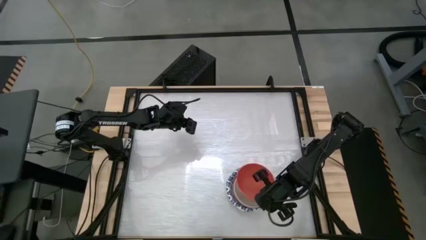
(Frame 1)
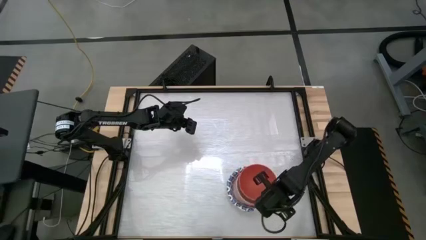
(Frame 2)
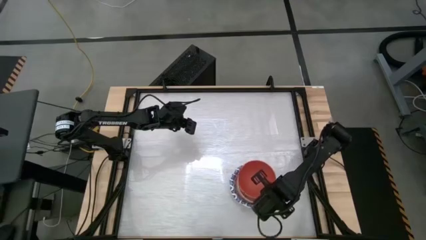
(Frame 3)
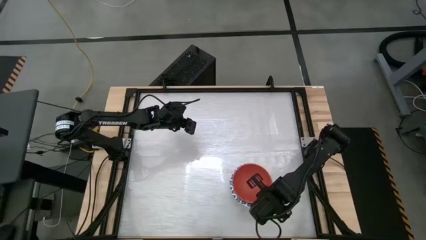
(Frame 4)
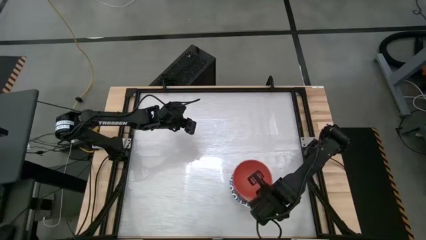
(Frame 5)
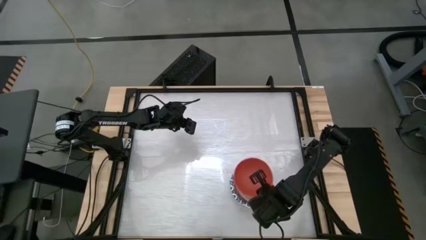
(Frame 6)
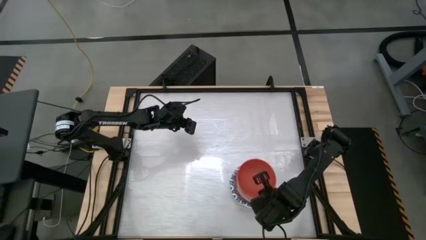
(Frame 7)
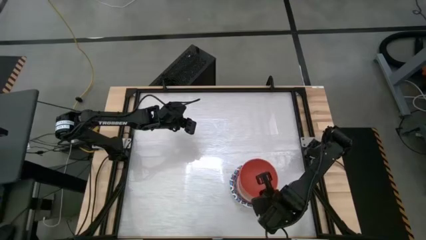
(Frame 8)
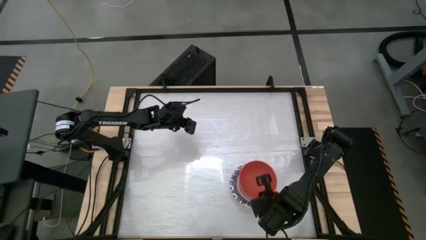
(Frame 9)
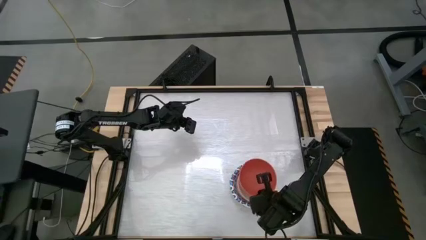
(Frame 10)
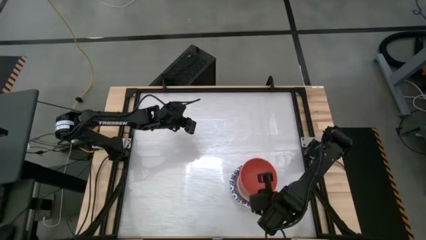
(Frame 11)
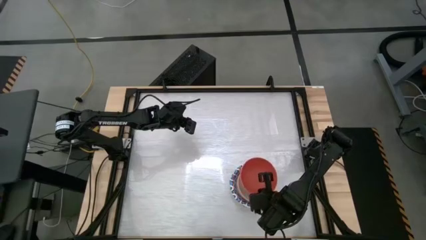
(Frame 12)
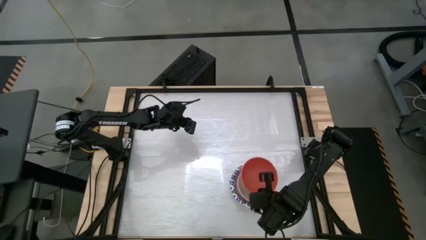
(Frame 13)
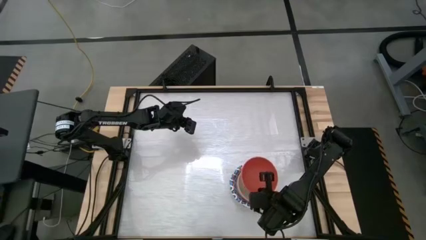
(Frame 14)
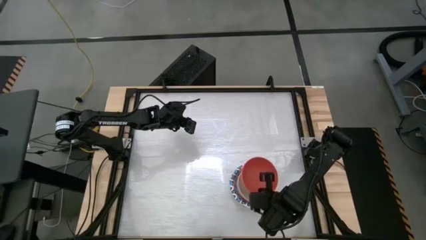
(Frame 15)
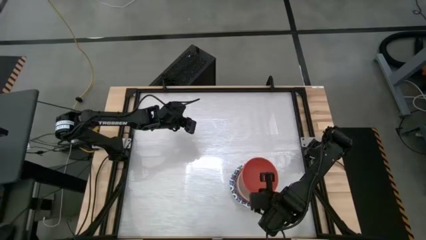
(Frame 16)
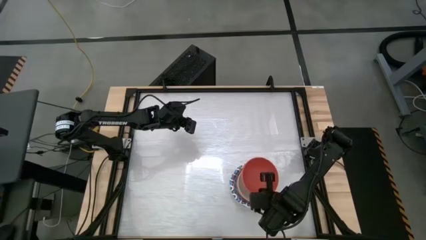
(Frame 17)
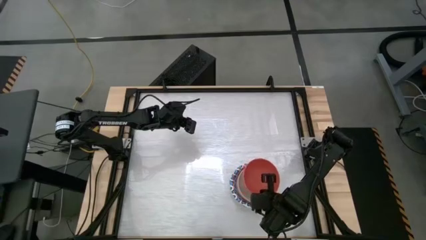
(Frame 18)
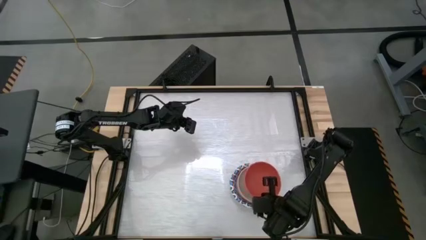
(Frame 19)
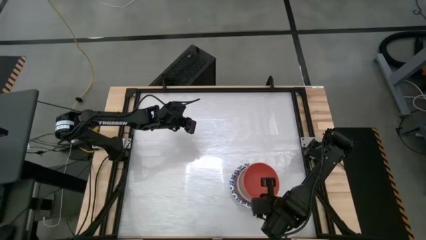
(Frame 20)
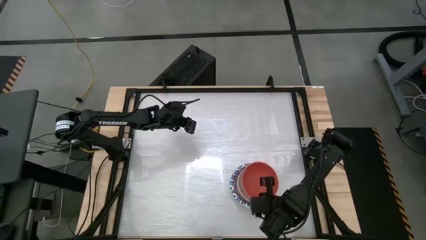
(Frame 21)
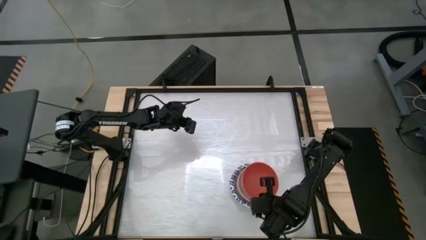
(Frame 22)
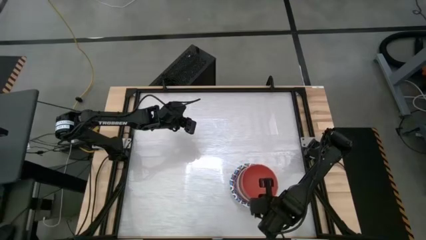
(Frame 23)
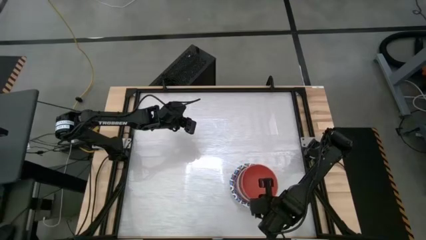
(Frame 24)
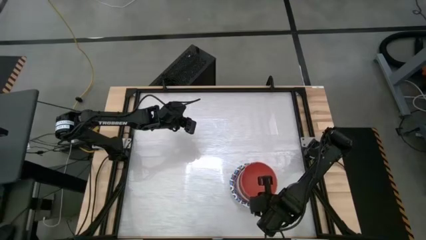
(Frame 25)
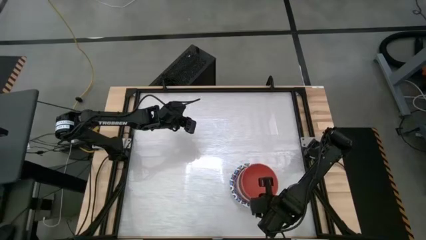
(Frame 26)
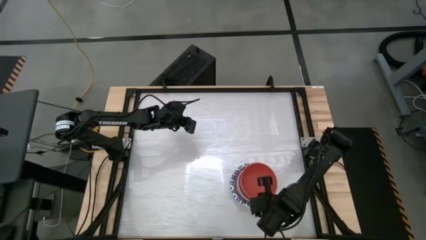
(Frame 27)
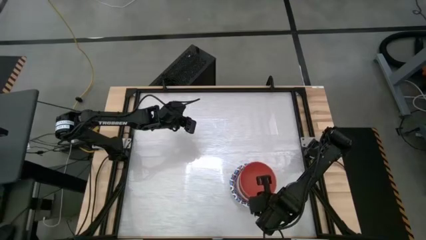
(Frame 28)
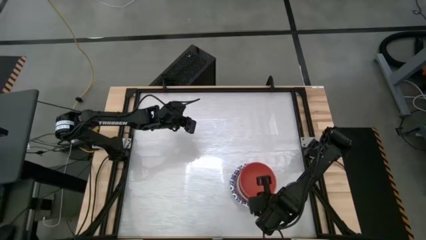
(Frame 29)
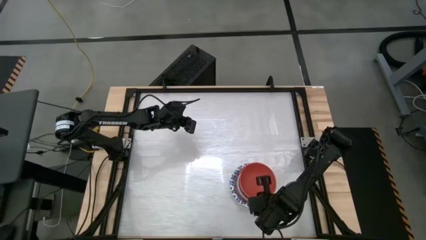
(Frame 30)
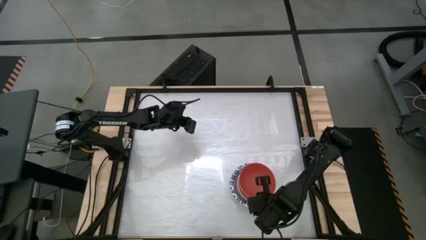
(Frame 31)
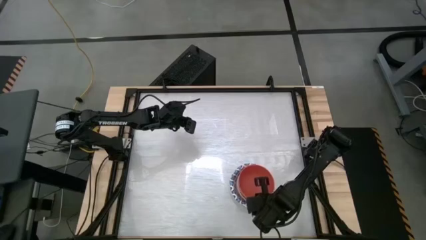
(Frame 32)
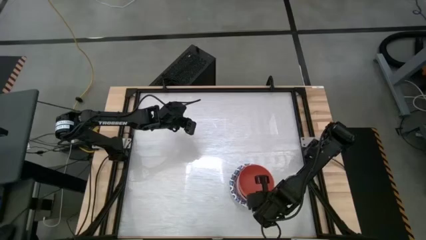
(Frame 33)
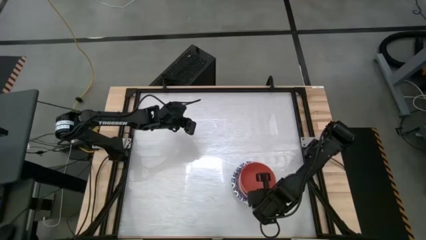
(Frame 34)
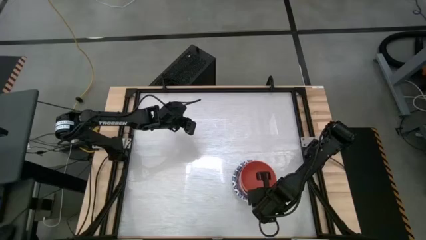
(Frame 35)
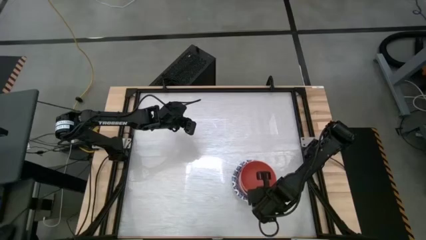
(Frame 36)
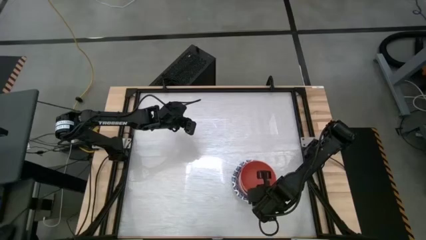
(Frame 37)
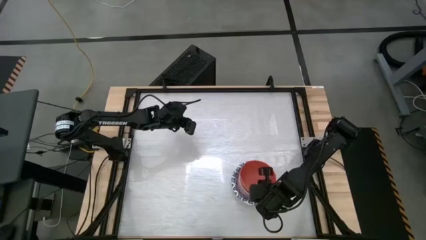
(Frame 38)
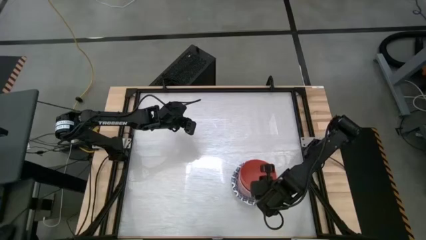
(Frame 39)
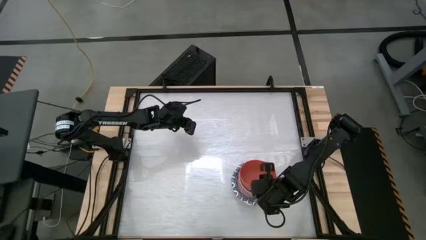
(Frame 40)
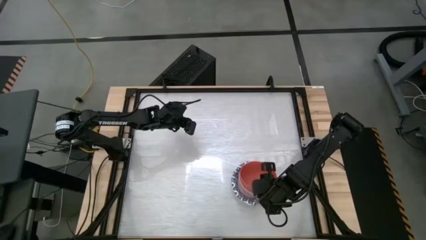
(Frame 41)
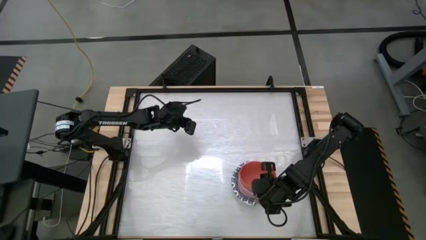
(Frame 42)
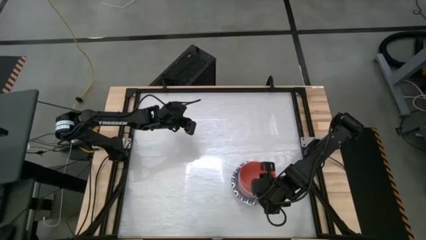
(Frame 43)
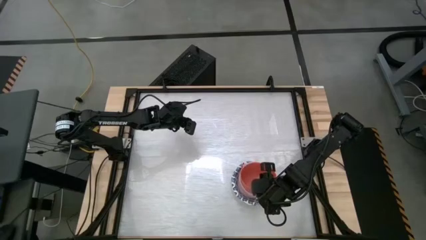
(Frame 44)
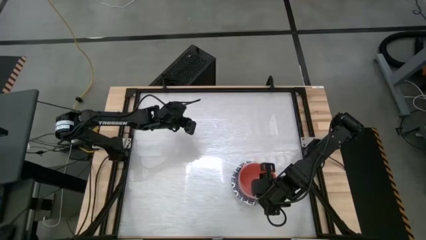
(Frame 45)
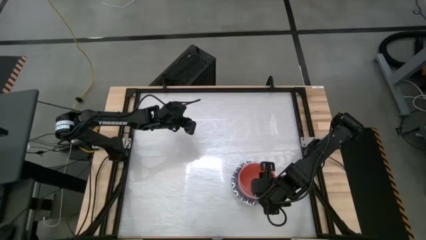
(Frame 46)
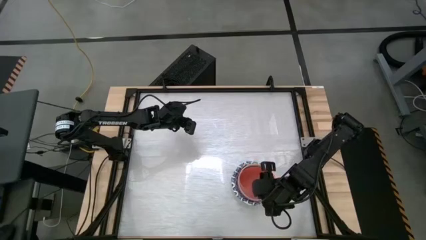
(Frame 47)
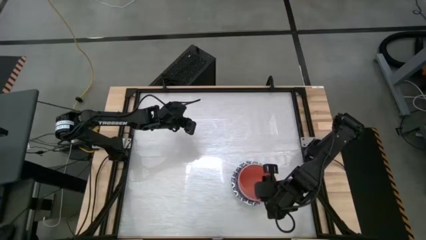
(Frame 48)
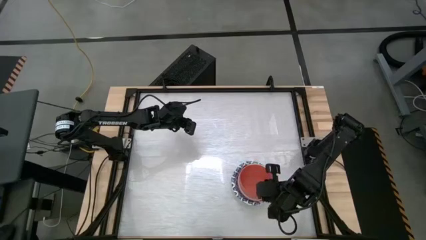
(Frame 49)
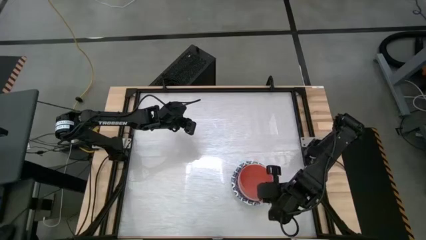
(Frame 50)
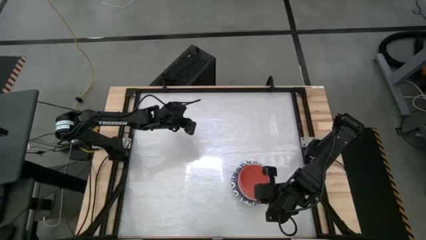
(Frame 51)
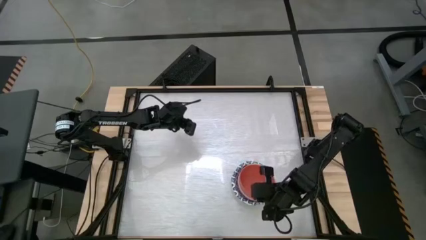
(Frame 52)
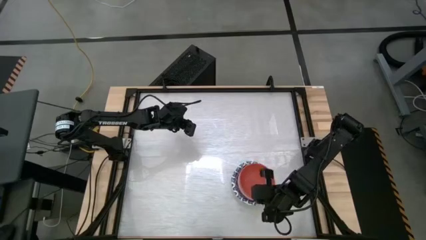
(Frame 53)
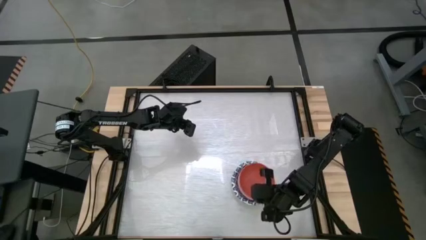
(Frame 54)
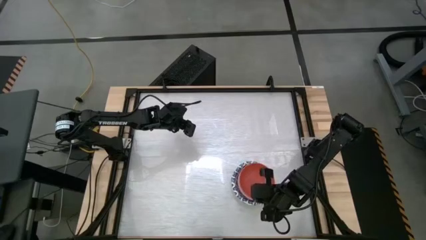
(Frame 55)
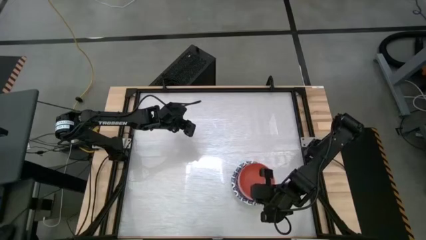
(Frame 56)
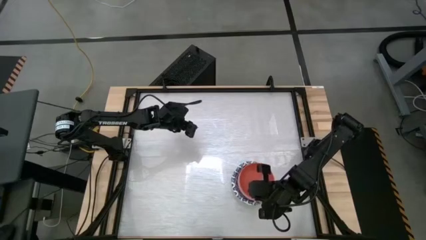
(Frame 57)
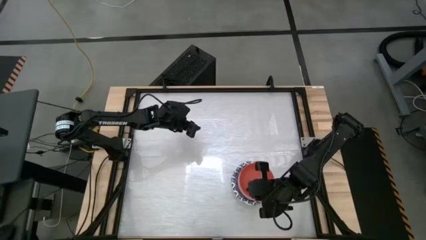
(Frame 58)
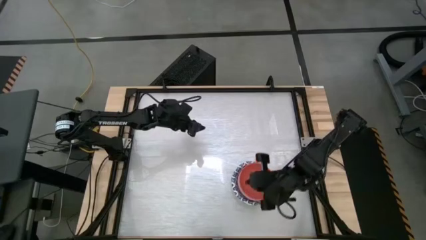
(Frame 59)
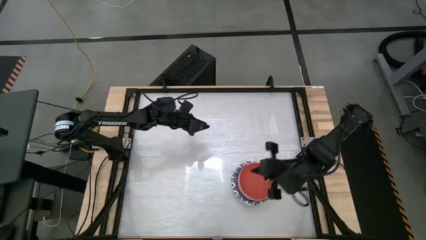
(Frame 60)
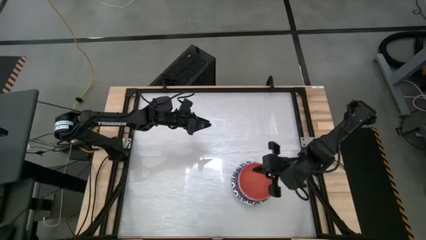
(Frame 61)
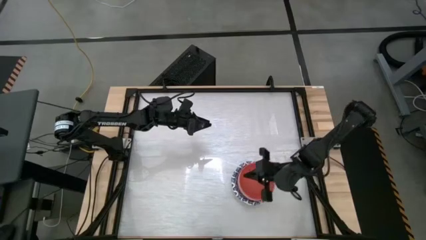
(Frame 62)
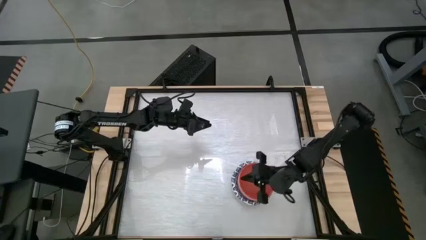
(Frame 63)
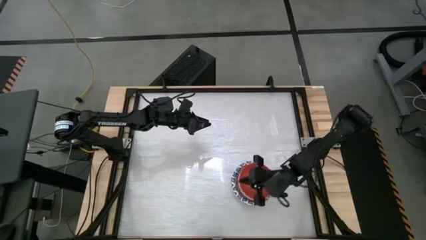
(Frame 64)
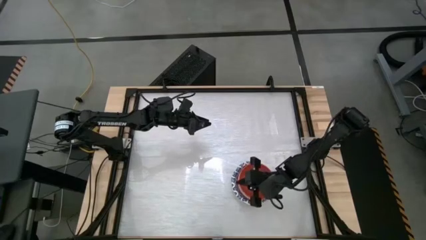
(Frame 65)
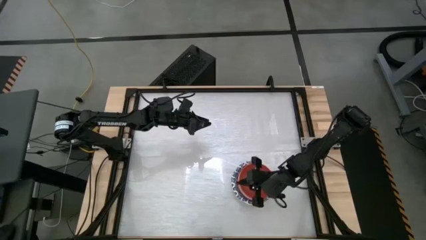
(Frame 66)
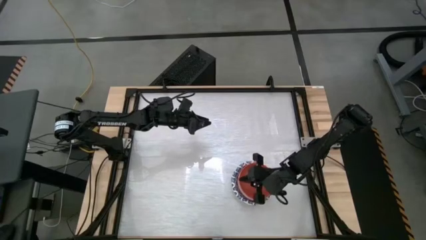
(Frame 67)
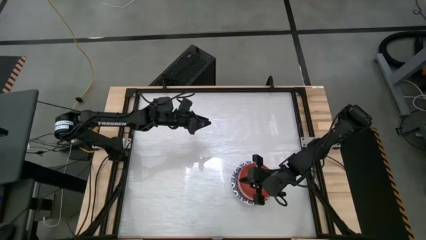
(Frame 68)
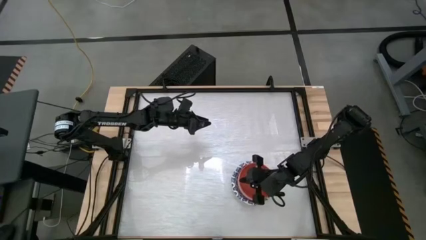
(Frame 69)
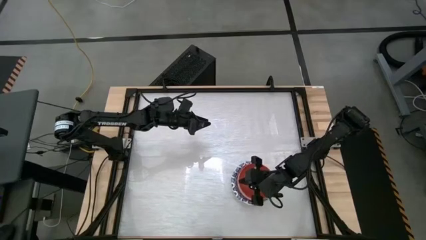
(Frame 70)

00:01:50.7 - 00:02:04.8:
Stack the orange bowl on top of the white bowl
